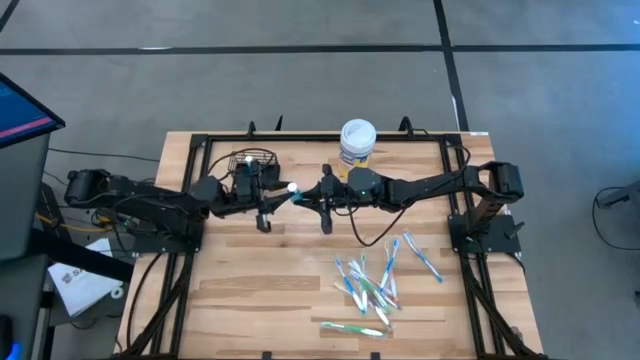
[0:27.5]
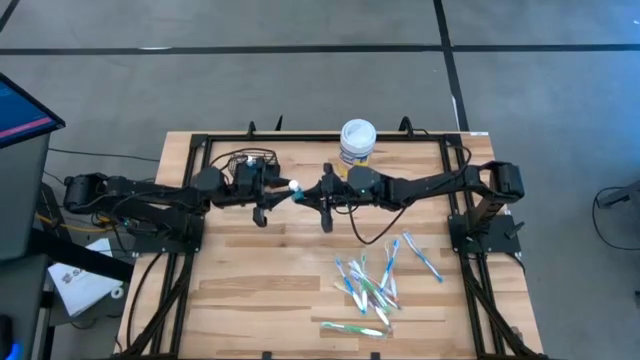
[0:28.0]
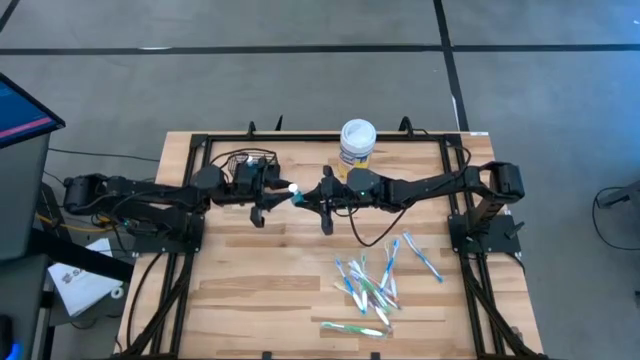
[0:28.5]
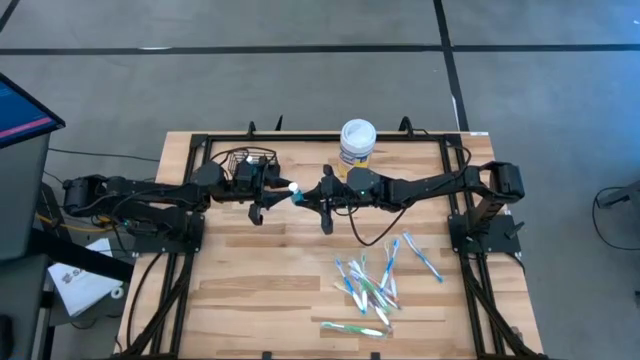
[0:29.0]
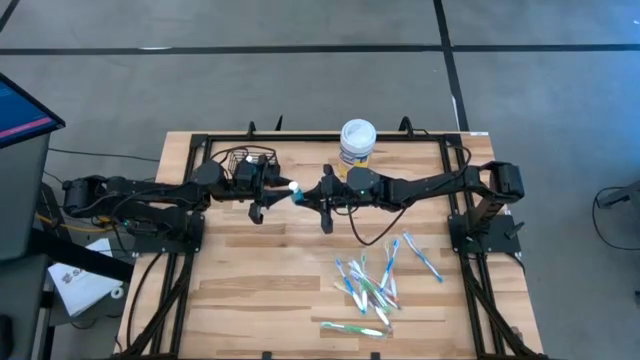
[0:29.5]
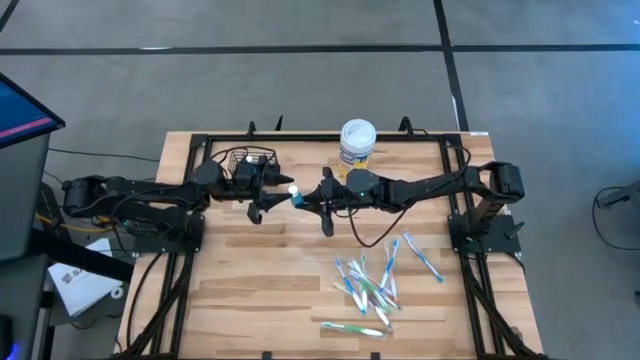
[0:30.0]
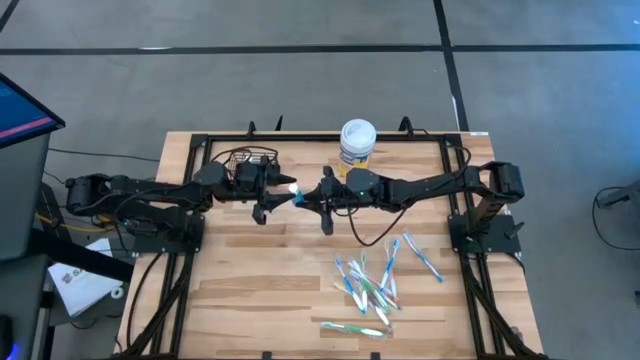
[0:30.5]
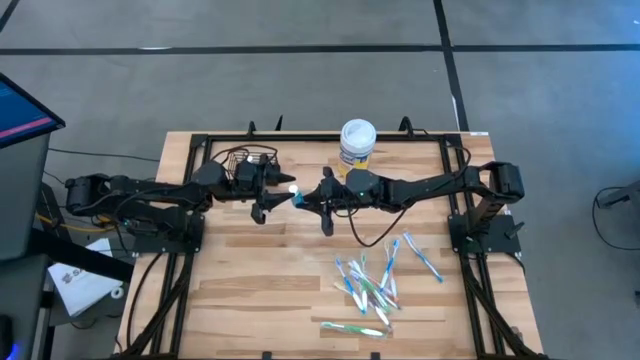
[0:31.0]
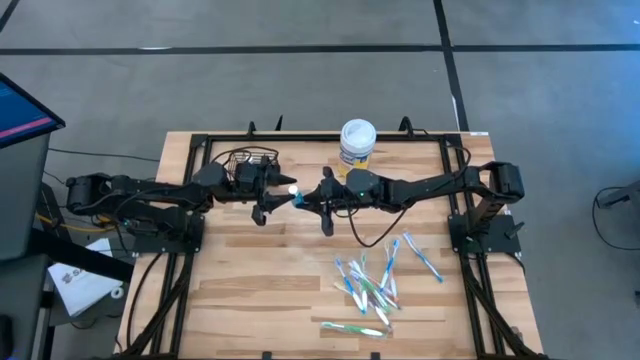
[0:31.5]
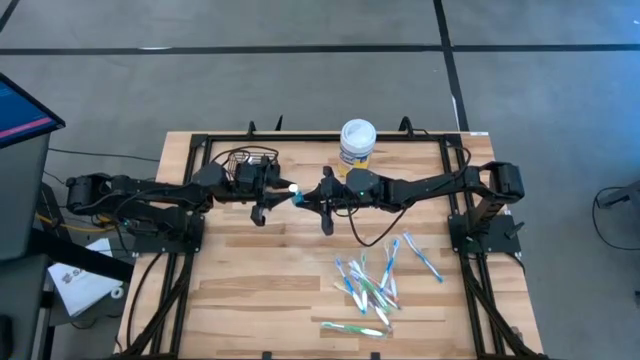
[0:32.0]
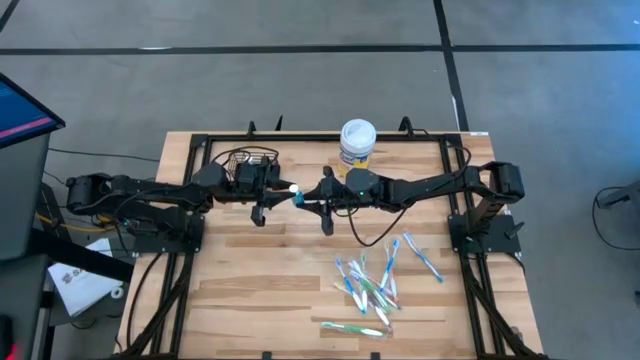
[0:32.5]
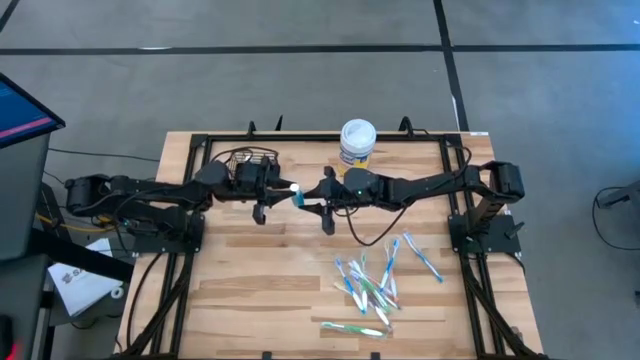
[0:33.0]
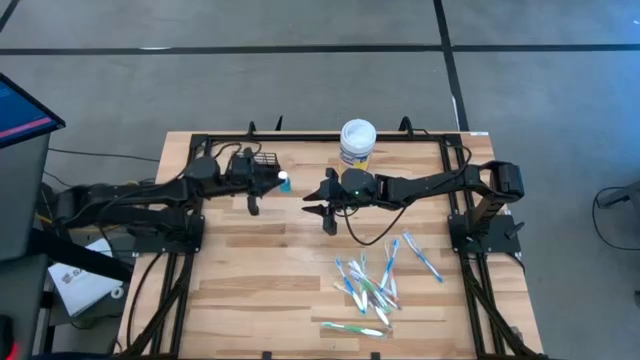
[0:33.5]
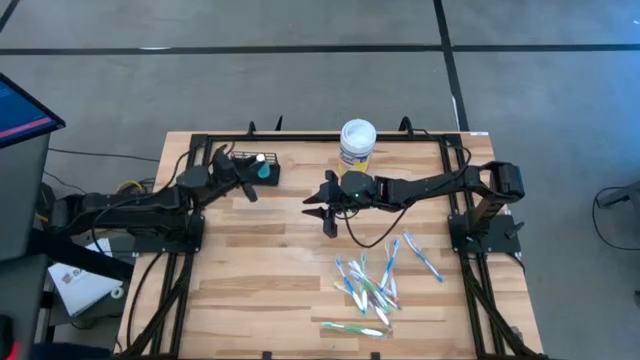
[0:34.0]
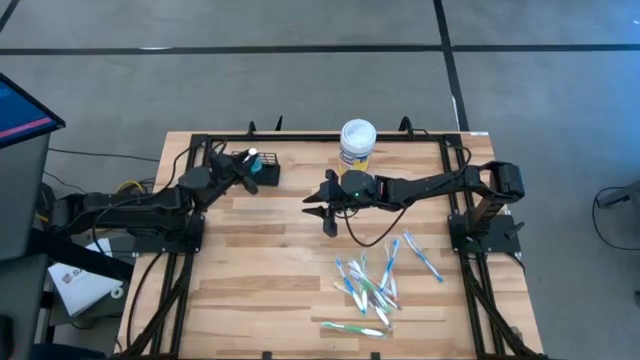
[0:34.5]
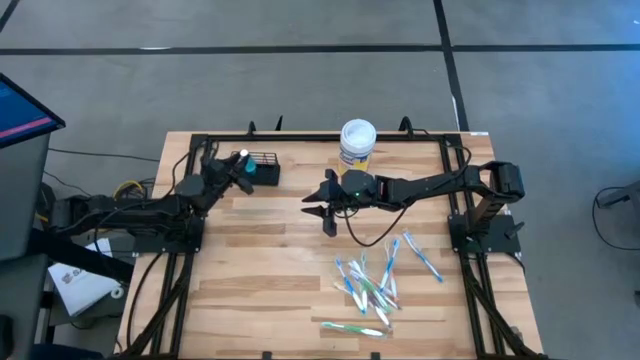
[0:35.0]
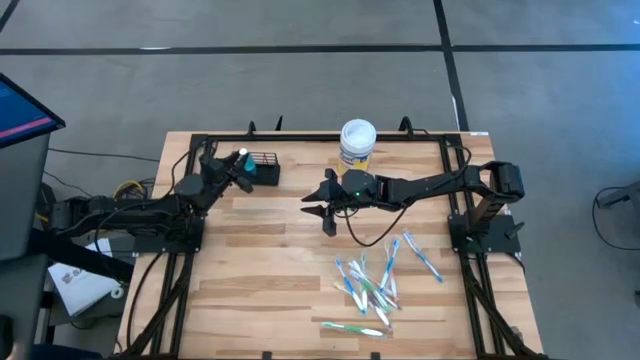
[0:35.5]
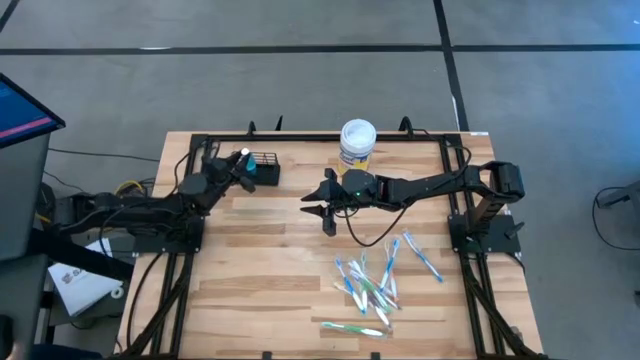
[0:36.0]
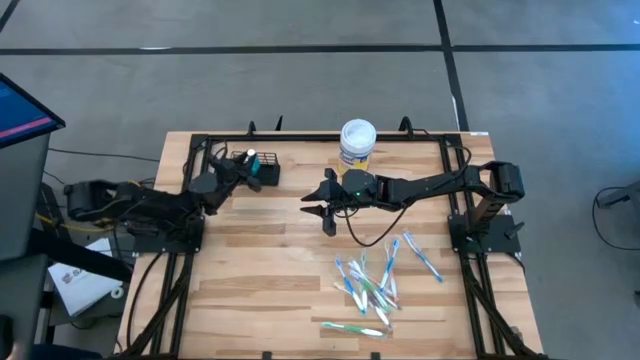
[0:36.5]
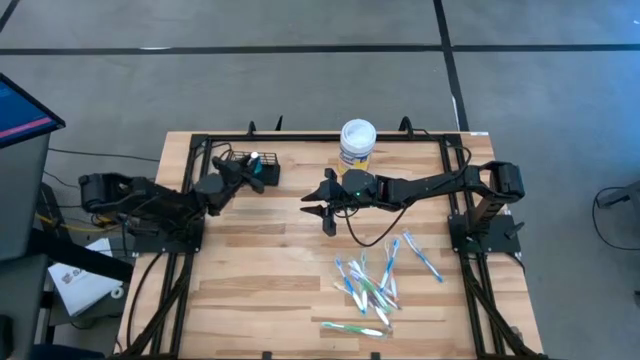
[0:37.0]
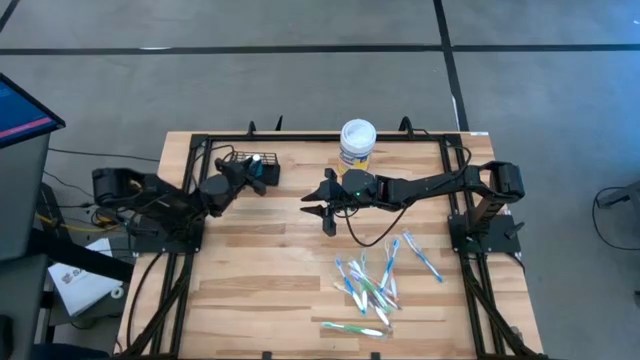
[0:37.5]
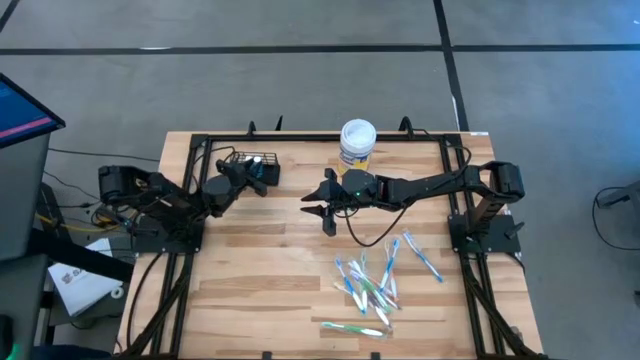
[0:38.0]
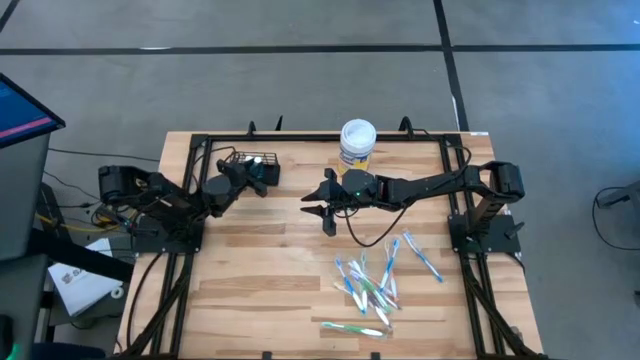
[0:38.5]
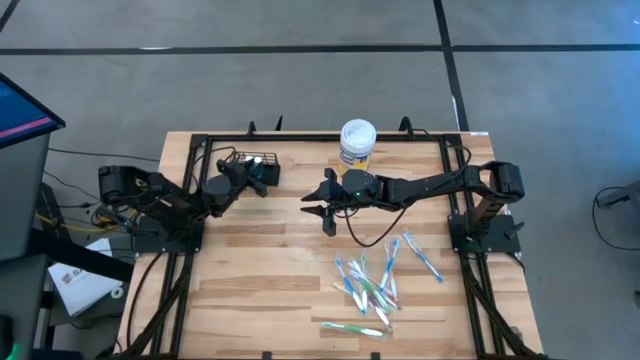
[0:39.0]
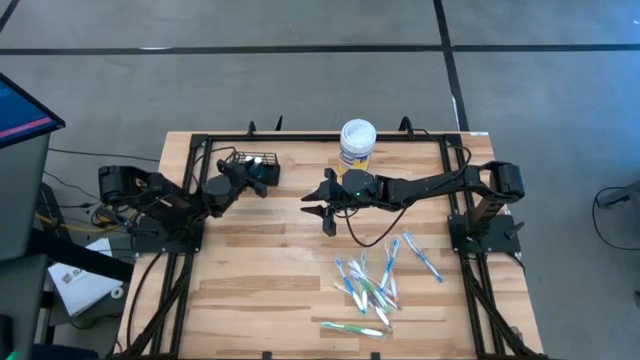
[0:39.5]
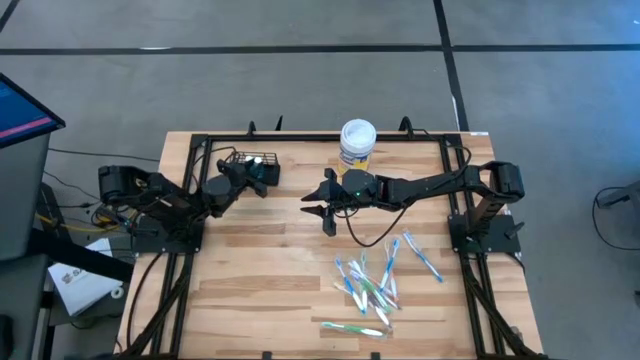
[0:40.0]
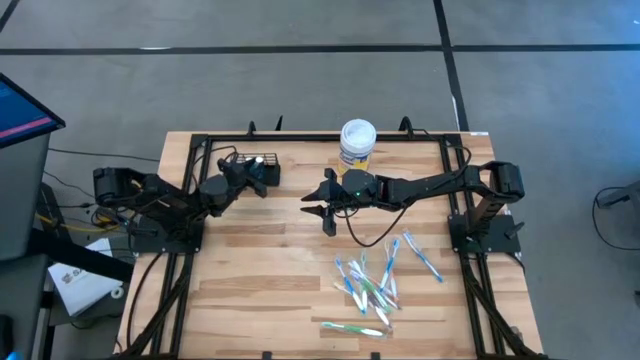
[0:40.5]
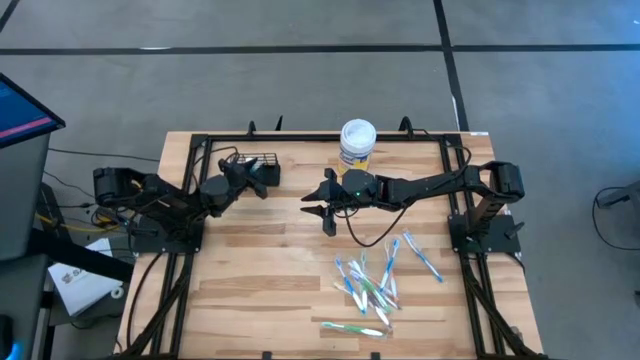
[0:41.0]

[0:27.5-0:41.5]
Task: Pick & Place toothbrushing station
Put the blue mouthwash into the mesh organizer

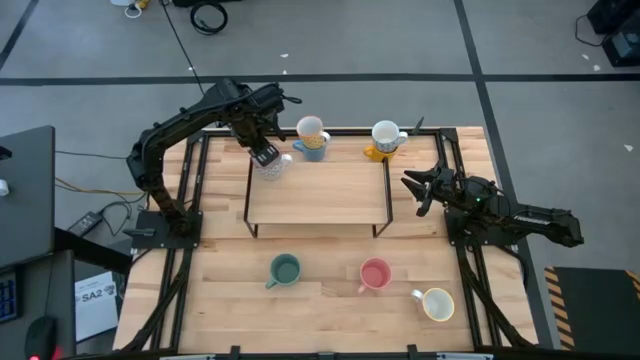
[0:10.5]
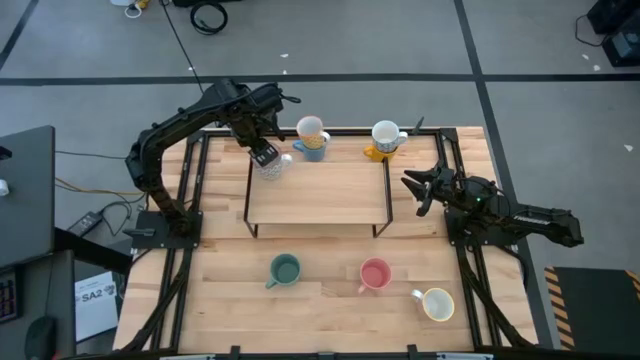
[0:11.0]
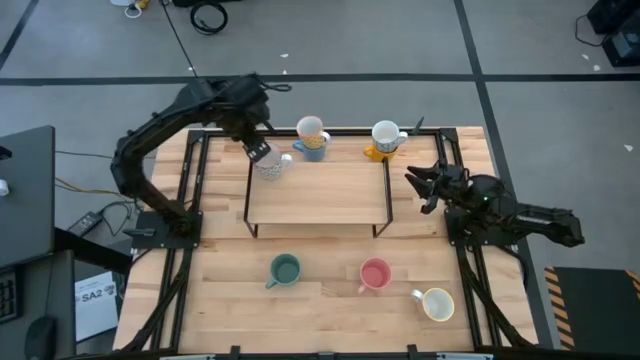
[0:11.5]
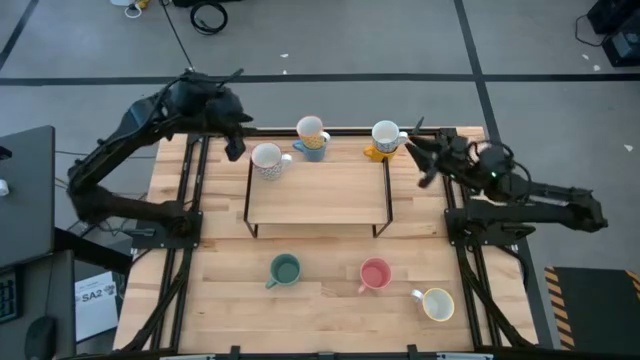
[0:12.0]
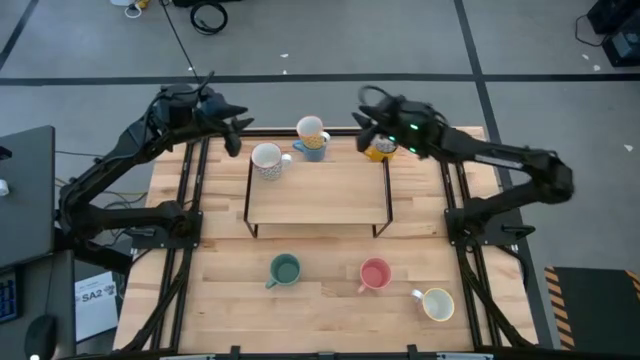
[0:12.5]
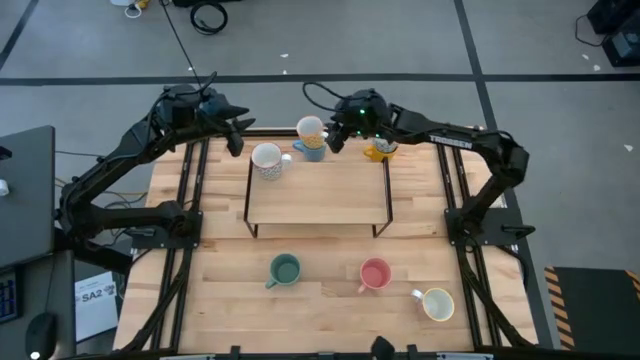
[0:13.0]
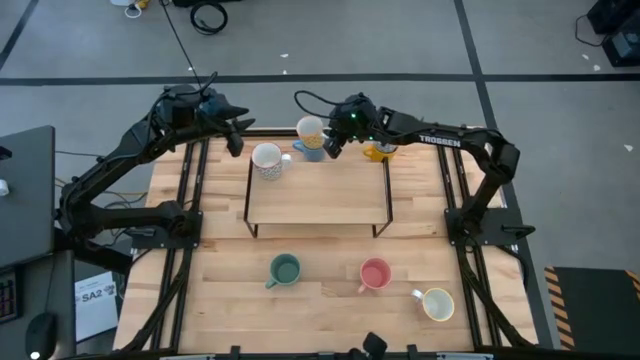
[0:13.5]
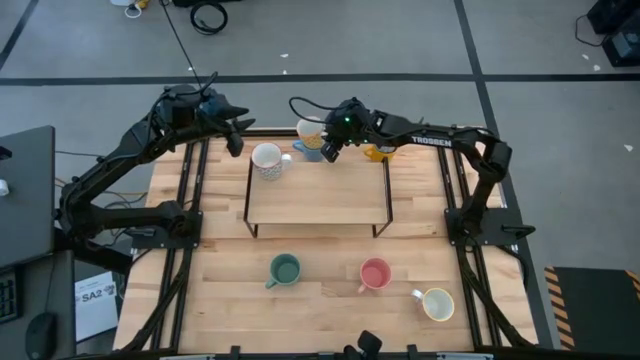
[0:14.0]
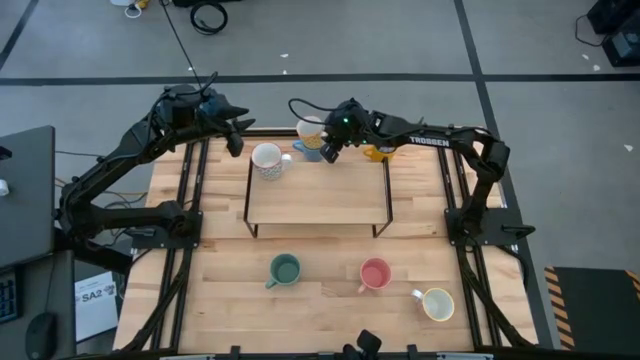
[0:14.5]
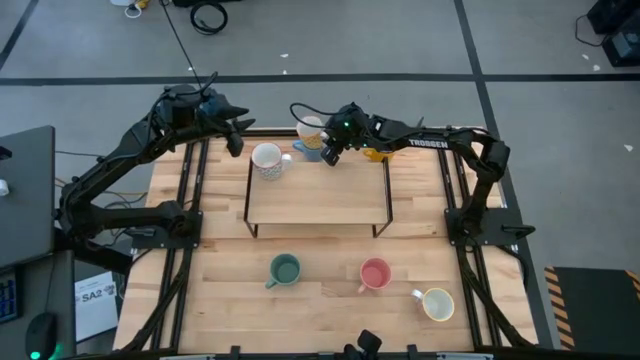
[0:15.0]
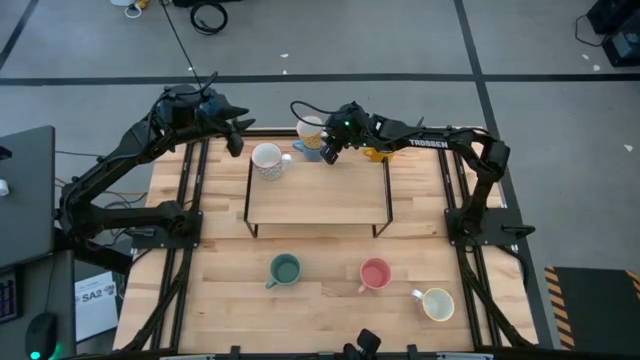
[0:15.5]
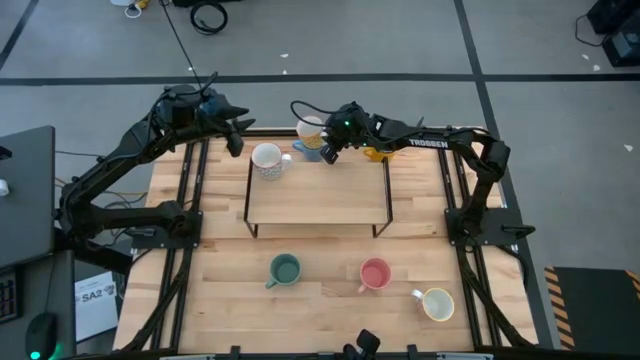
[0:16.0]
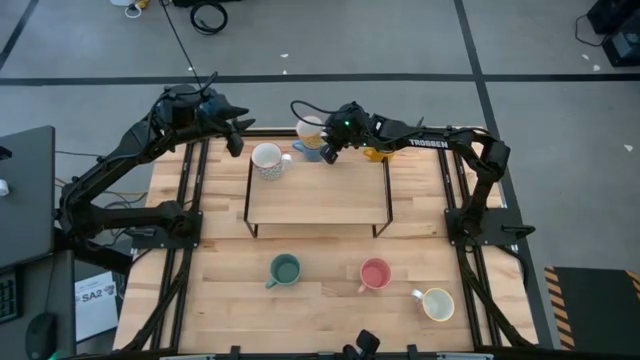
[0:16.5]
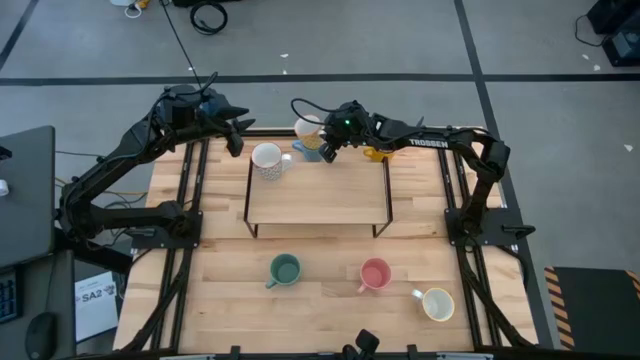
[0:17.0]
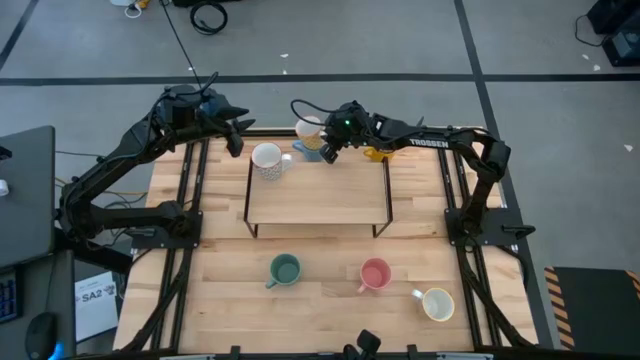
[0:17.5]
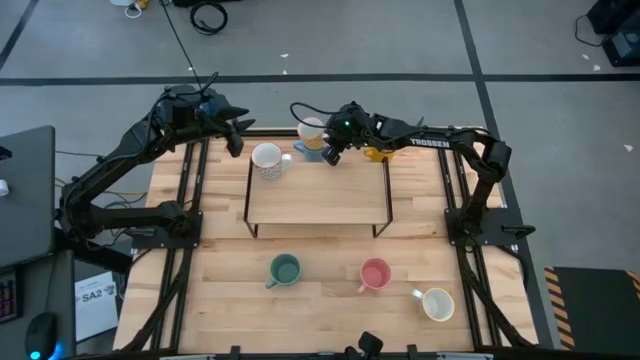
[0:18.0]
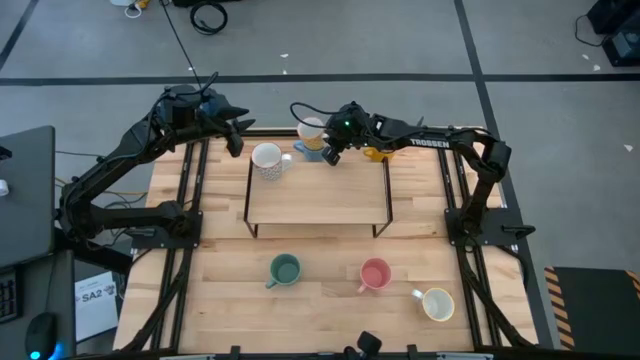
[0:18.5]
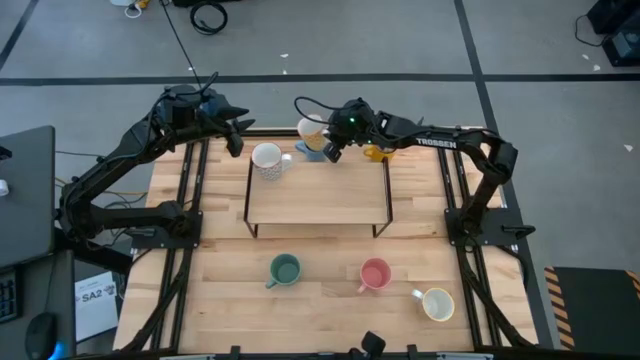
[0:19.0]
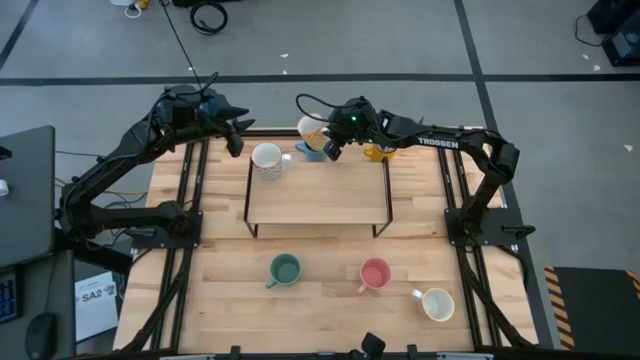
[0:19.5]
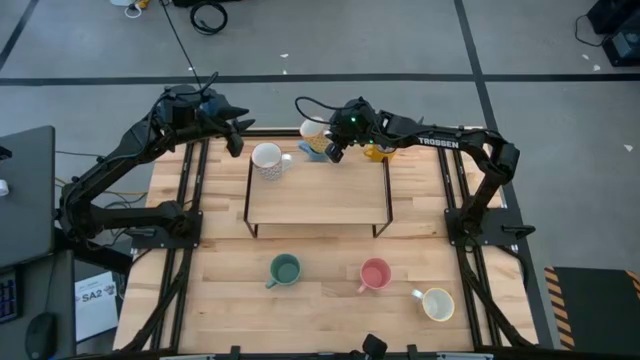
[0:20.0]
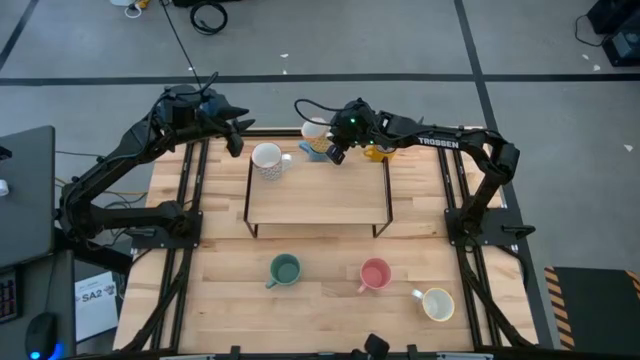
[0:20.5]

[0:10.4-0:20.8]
Task: Place coffee mugs
Put the yellow patterned mug on the shelf
